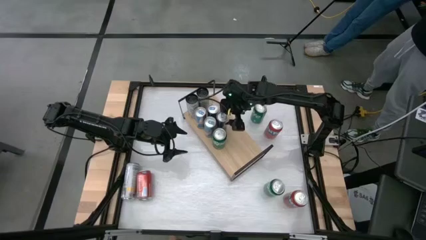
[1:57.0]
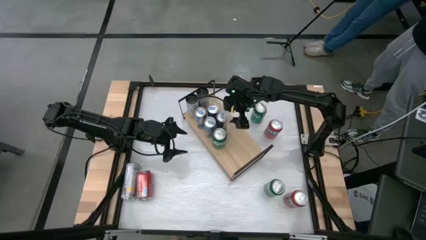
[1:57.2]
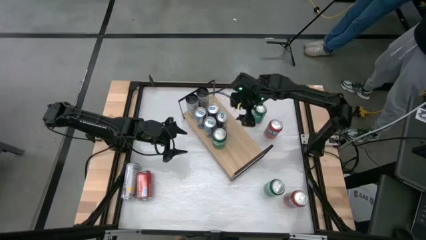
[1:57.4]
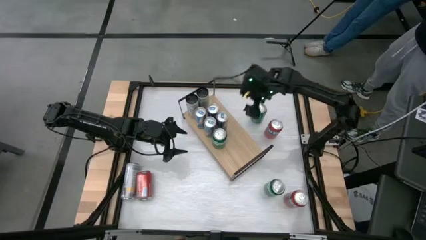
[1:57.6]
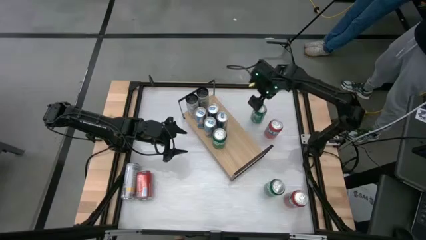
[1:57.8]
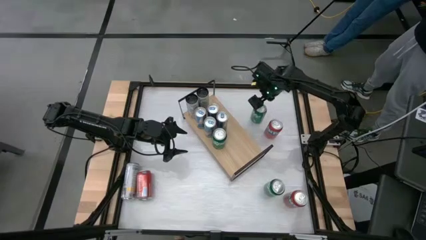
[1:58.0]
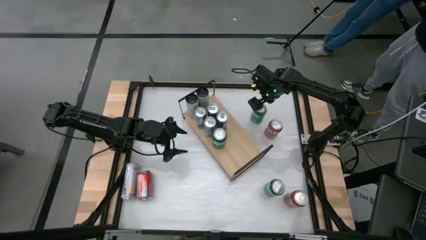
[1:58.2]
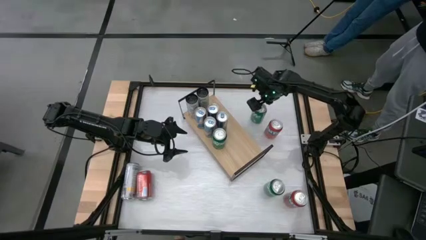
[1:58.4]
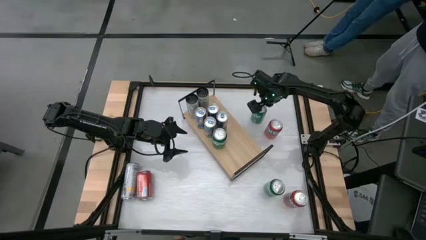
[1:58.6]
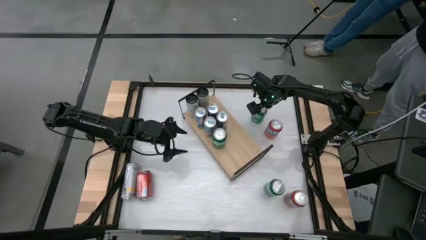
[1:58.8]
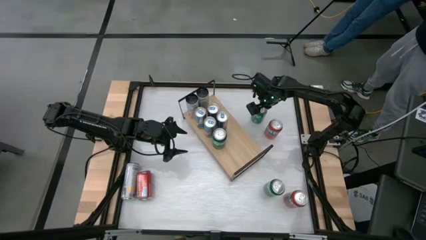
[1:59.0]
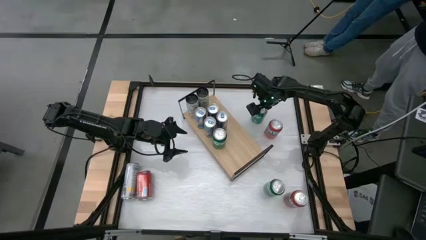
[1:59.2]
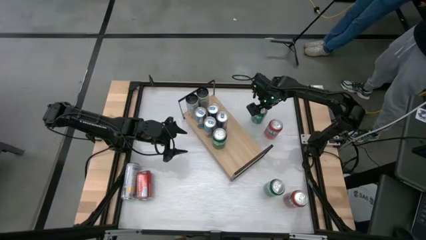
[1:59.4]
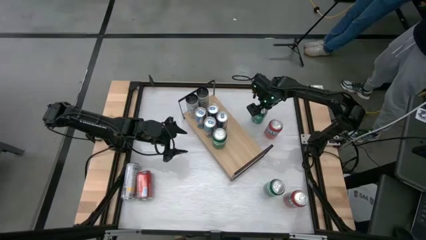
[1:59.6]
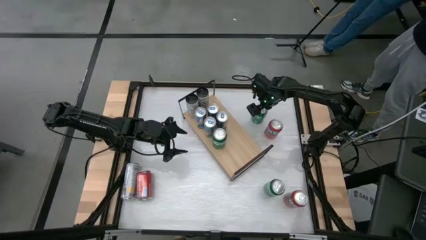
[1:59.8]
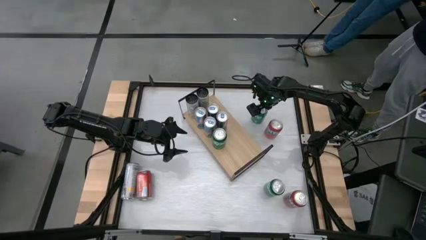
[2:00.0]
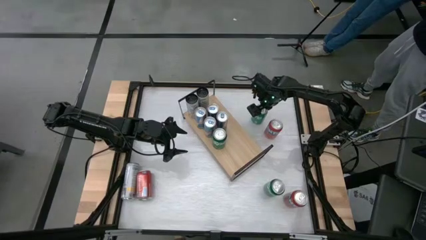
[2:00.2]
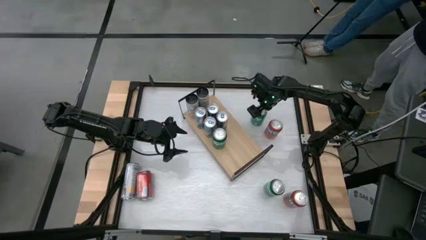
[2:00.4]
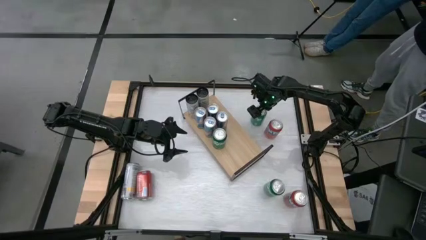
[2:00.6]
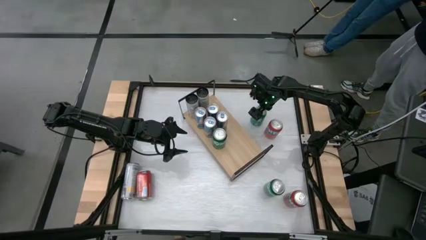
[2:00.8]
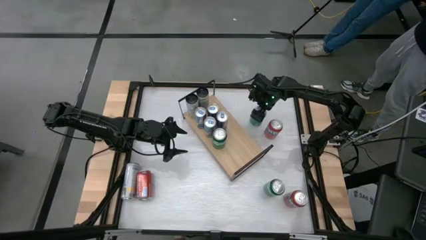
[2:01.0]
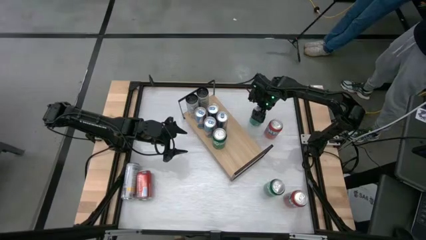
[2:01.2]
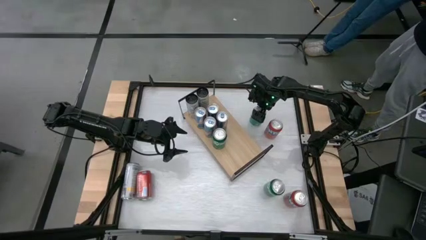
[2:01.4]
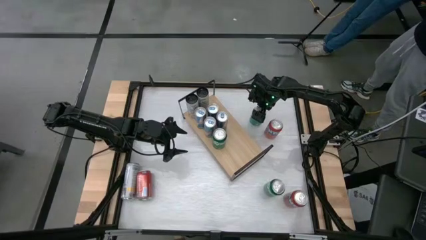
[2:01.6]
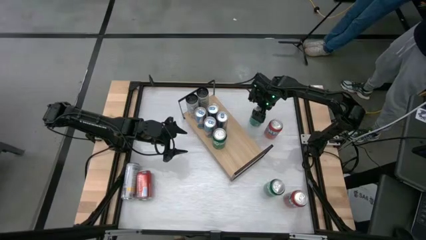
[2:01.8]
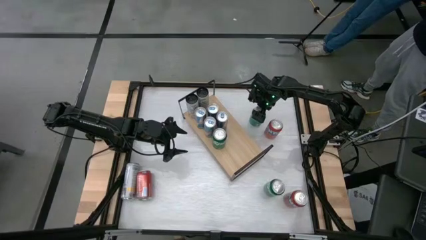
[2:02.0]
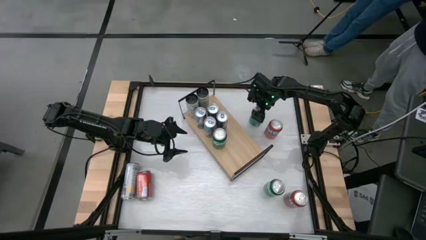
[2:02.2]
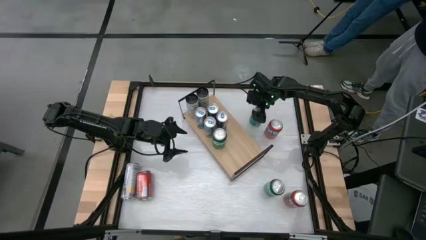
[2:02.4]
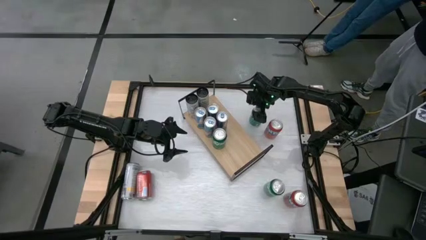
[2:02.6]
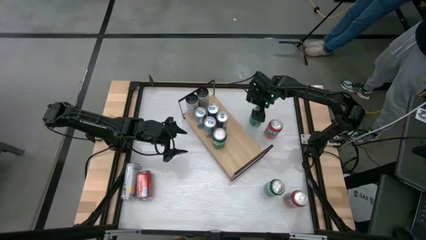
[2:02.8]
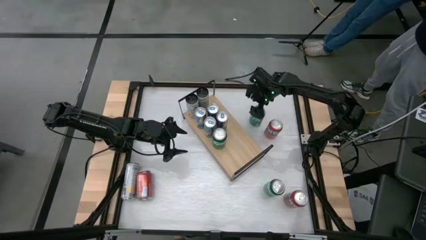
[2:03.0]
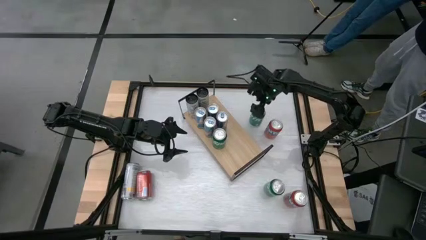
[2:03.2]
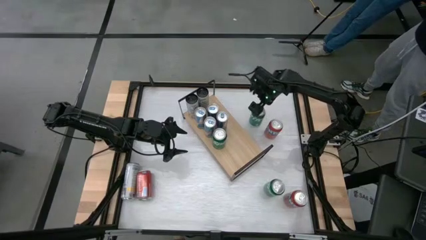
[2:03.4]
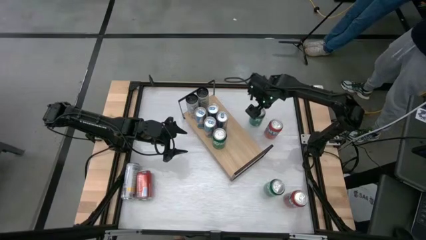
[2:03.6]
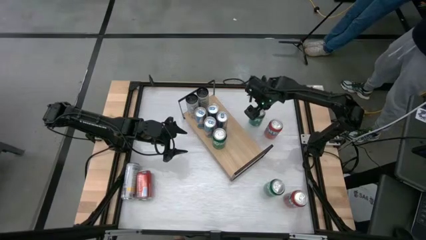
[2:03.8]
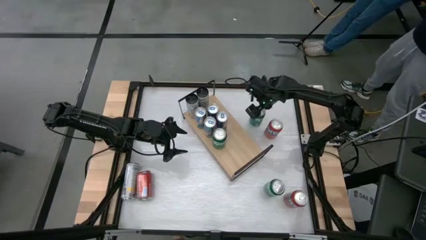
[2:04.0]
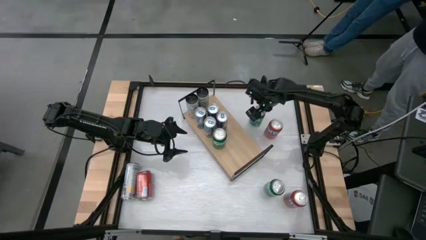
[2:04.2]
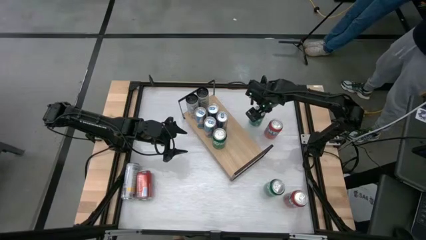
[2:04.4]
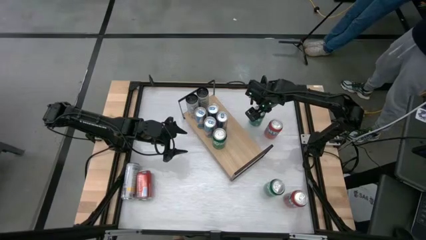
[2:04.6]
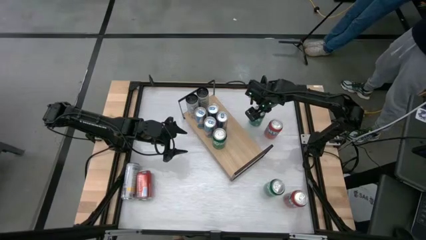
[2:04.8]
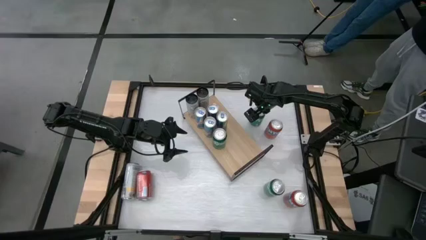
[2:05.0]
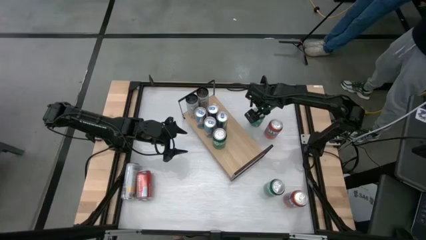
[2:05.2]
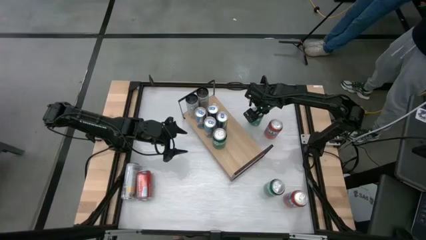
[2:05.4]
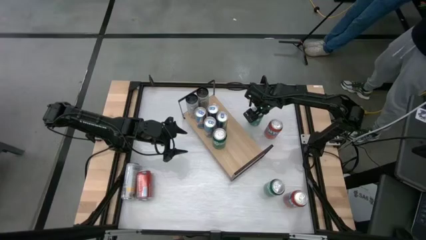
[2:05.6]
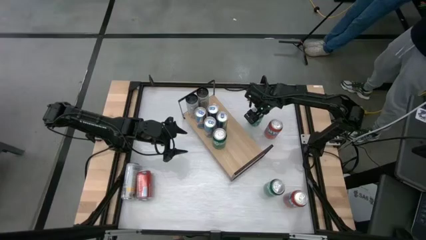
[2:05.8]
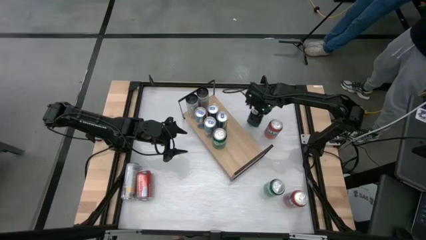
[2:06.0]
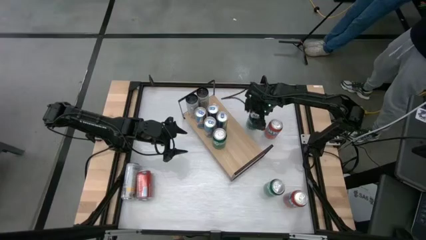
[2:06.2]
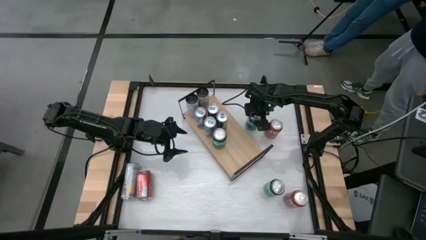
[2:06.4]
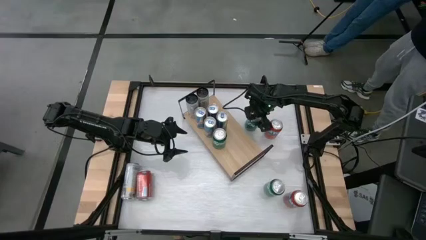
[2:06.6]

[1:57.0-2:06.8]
Task: Place canned beverage on shelf
Put the top green soda can on the shelf aligned with the other green soda can

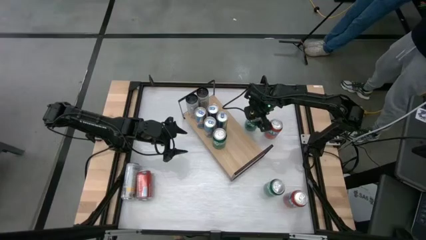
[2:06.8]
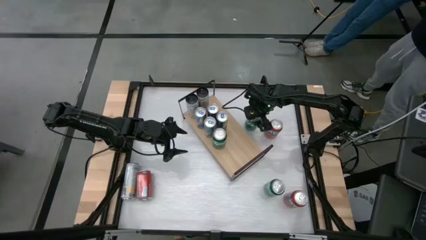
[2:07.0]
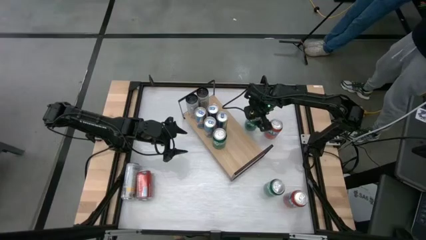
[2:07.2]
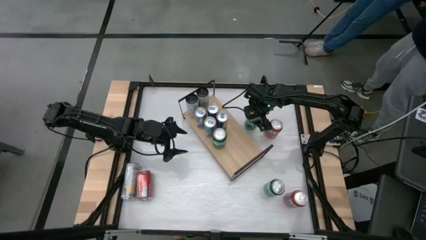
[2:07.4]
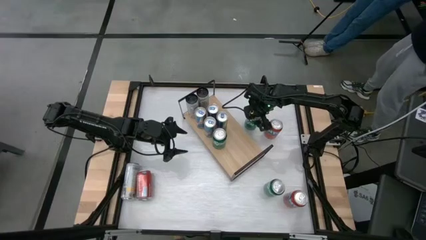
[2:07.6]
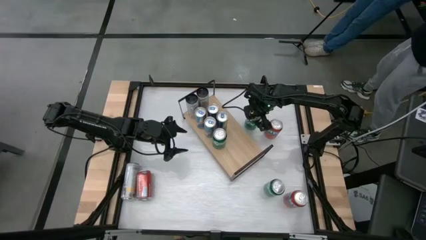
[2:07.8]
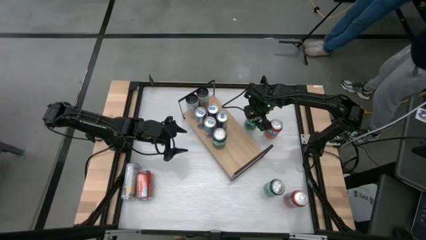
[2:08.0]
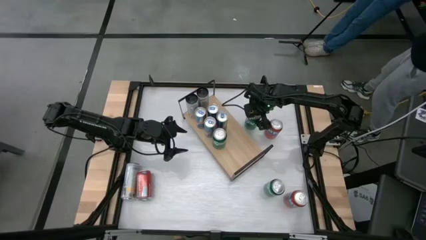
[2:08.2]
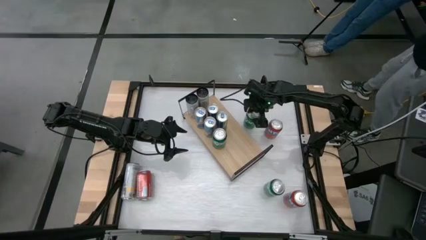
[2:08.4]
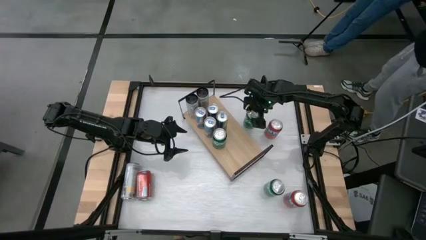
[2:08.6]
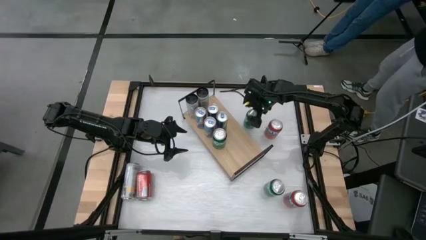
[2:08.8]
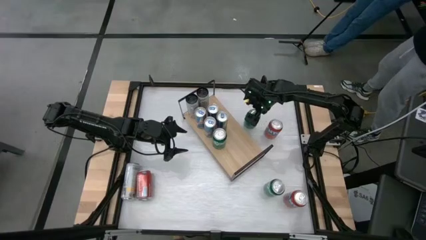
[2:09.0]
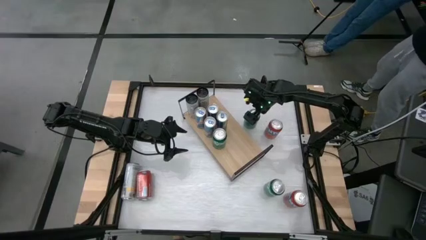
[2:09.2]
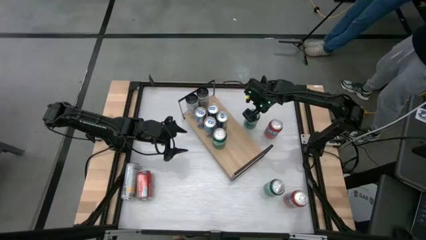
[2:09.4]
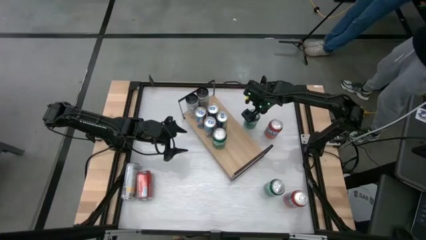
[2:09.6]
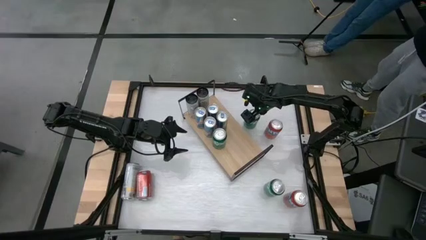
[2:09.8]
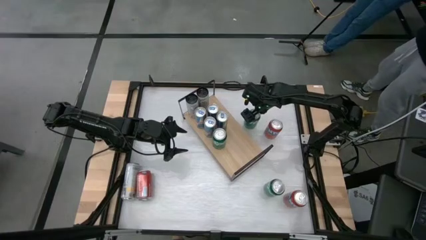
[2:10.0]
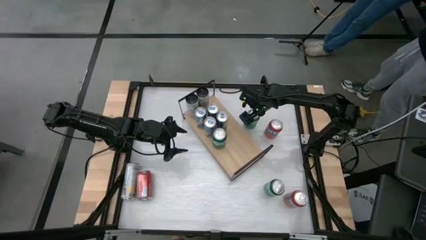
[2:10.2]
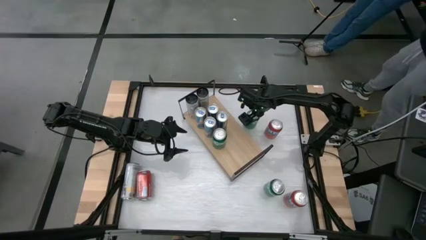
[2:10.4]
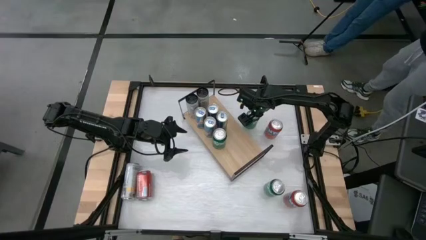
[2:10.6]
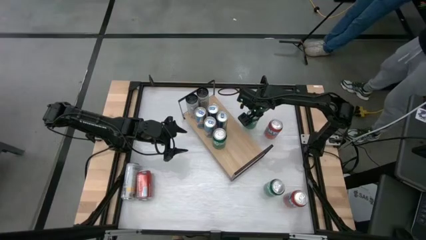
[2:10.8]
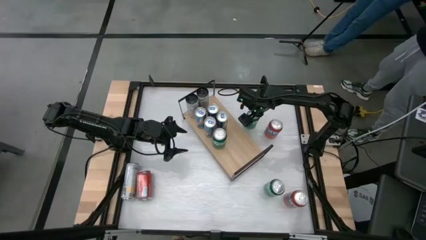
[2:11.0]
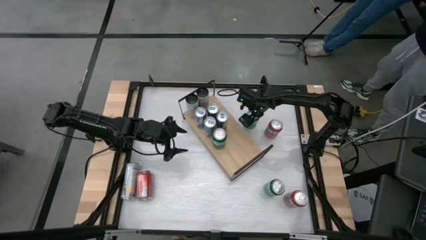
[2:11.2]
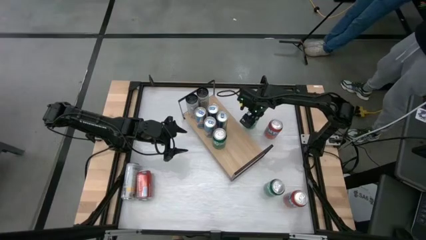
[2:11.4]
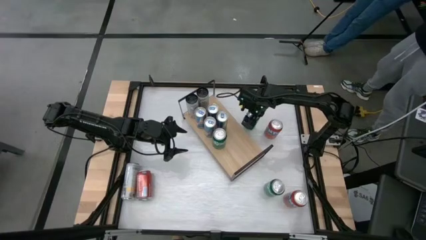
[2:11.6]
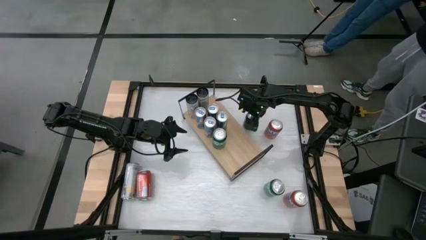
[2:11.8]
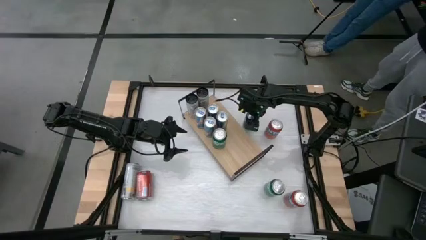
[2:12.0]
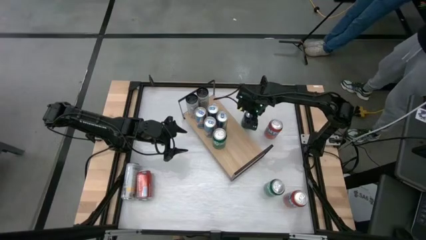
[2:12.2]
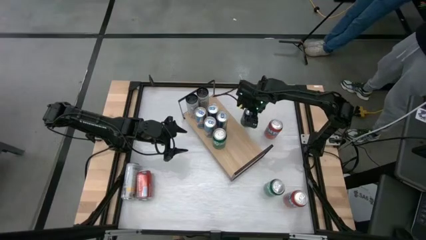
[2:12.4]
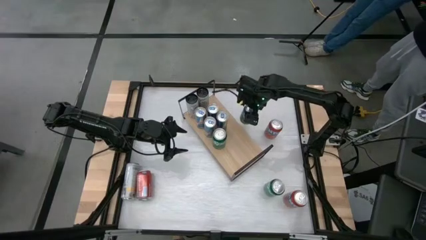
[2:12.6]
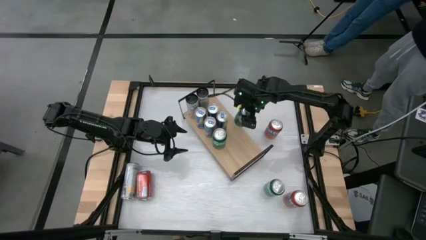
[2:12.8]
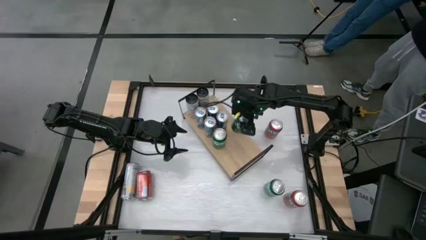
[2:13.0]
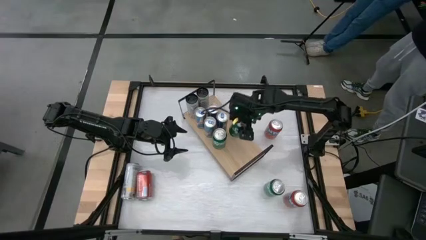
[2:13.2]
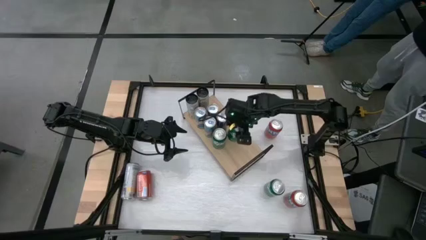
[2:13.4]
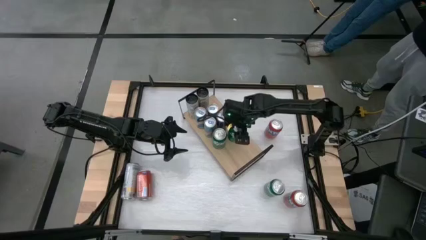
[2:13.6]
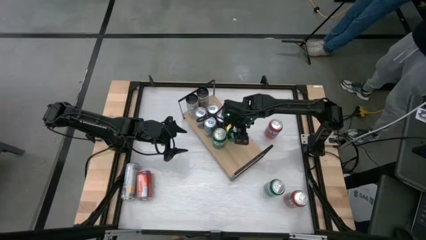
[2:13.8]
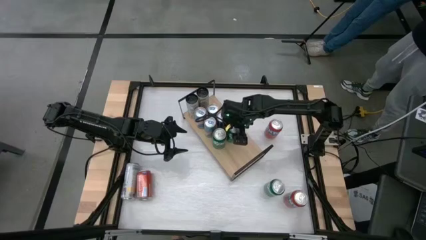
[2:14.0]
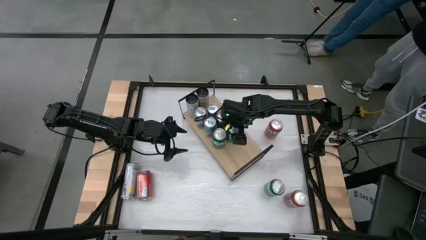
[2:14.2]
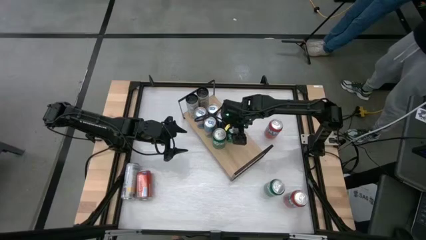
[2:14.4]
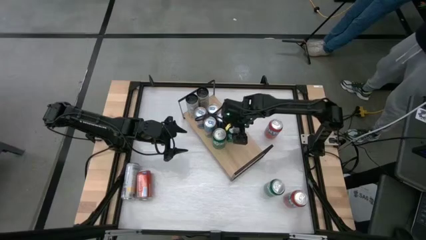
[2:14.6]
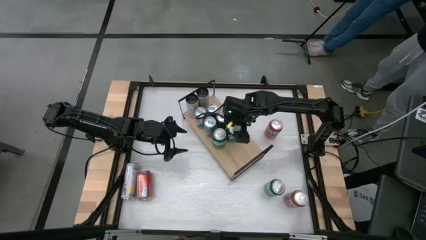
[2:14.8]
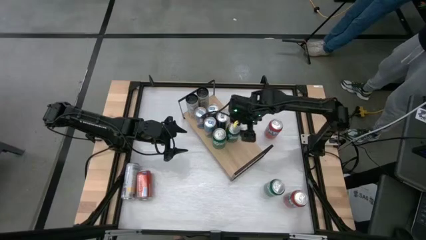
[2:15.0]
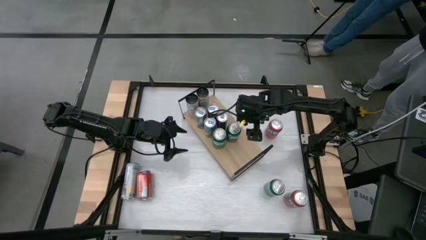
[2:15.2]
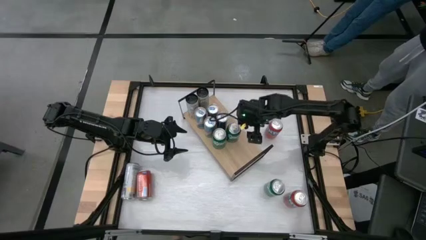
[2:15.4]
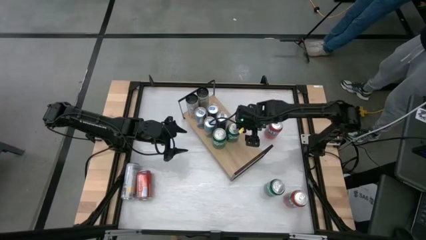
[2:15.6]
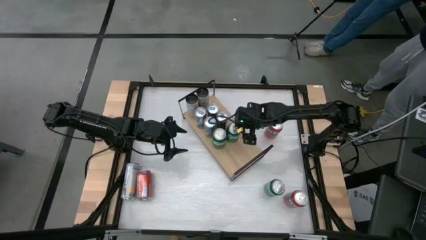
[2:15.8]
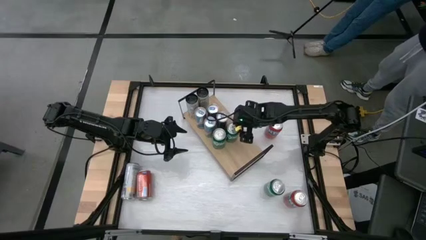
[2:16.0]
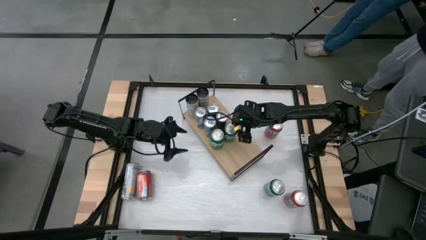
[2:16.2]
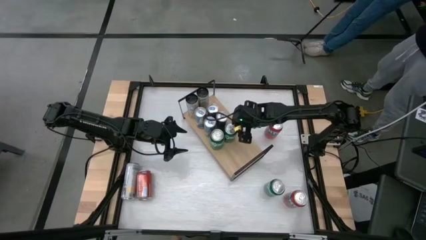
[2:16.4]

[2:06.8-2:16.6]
Put the top green soda can on the shelf aligned with the other green soda can
